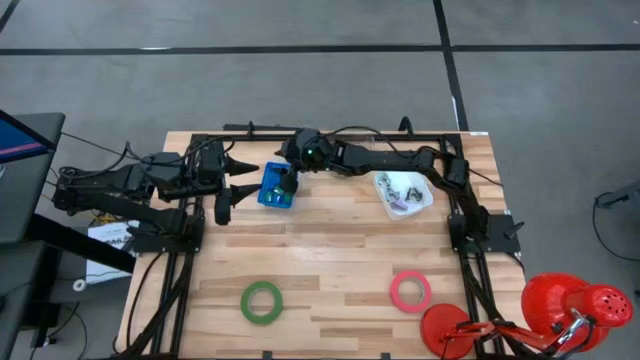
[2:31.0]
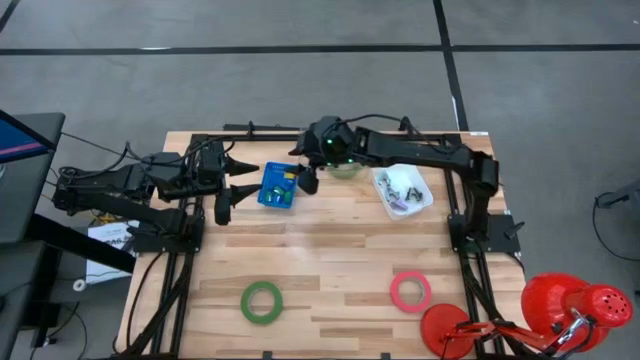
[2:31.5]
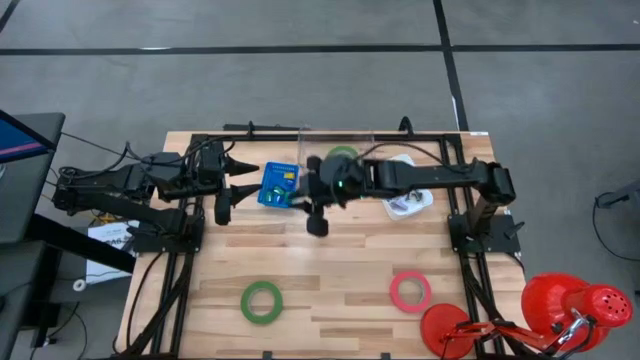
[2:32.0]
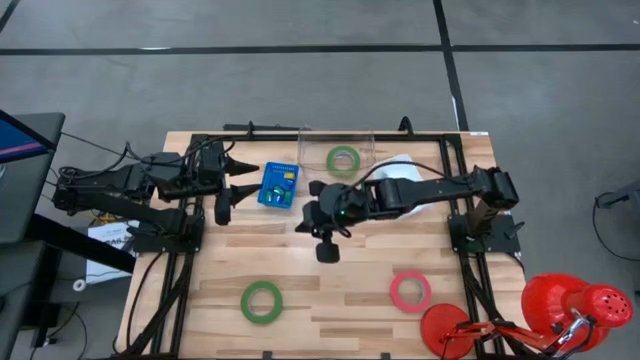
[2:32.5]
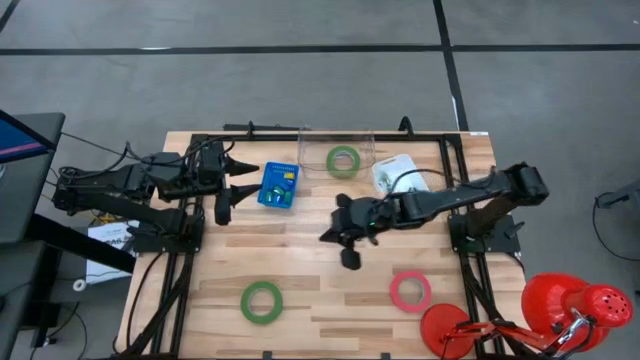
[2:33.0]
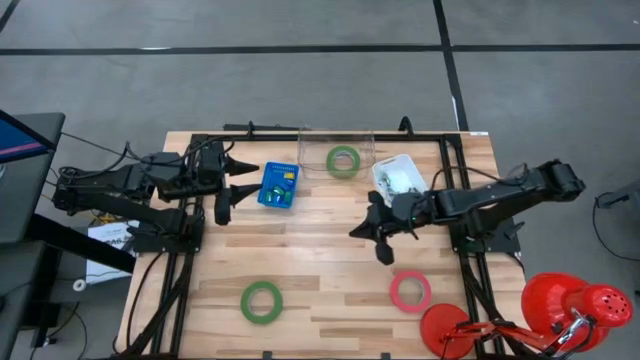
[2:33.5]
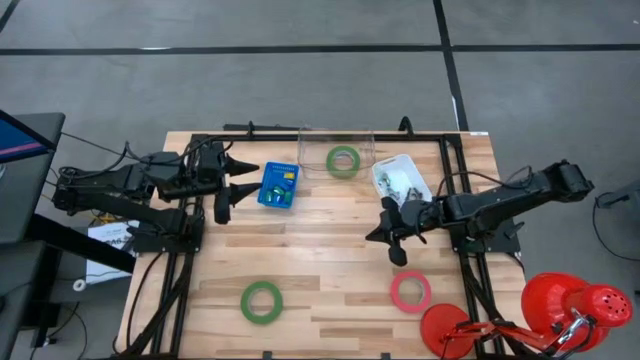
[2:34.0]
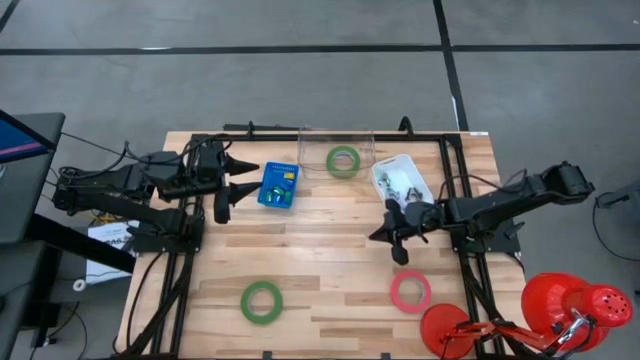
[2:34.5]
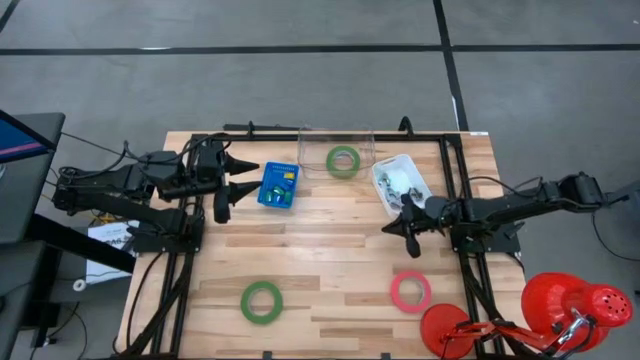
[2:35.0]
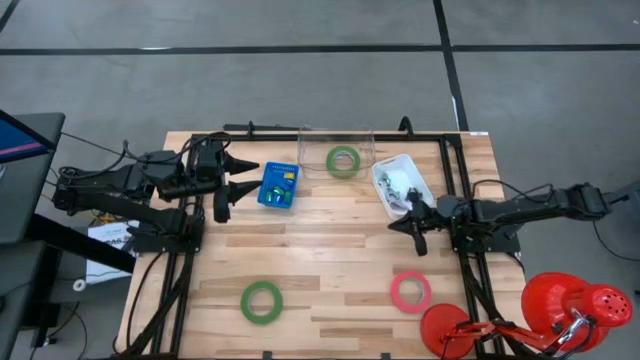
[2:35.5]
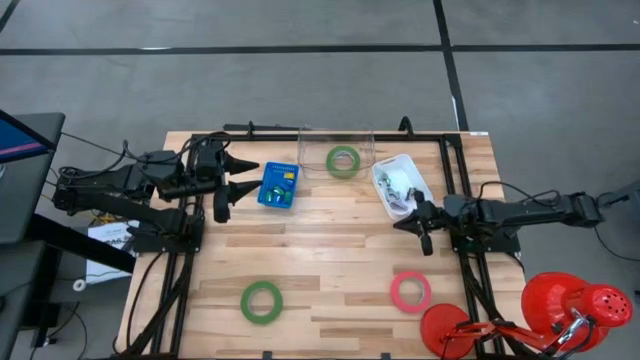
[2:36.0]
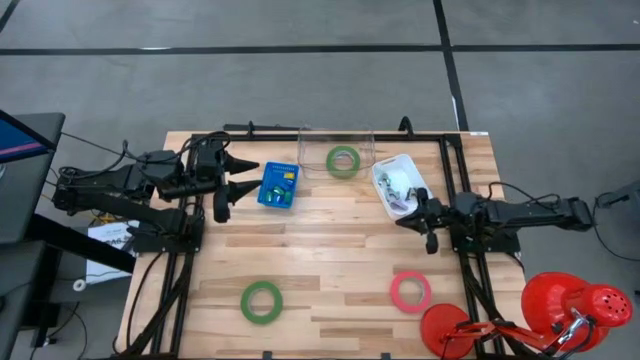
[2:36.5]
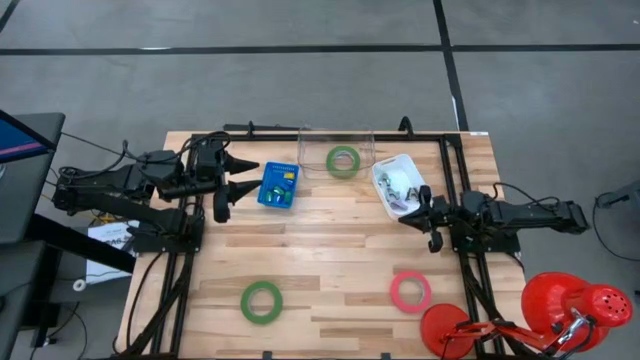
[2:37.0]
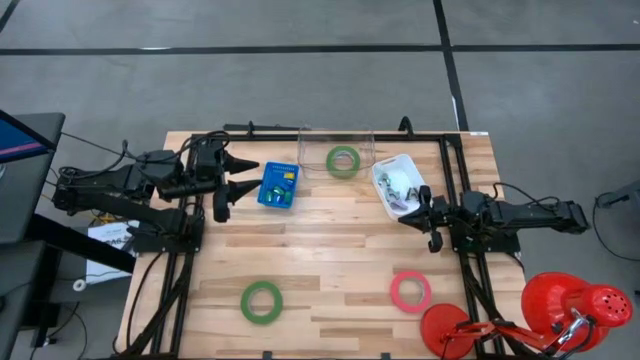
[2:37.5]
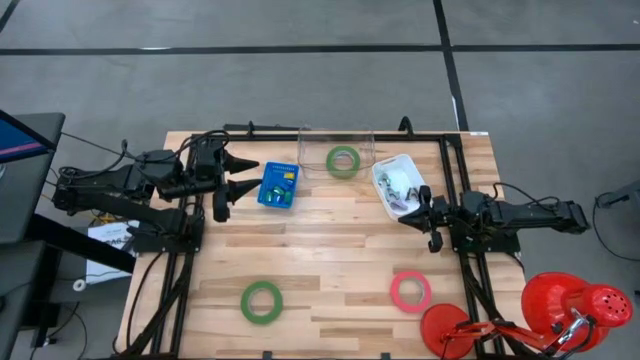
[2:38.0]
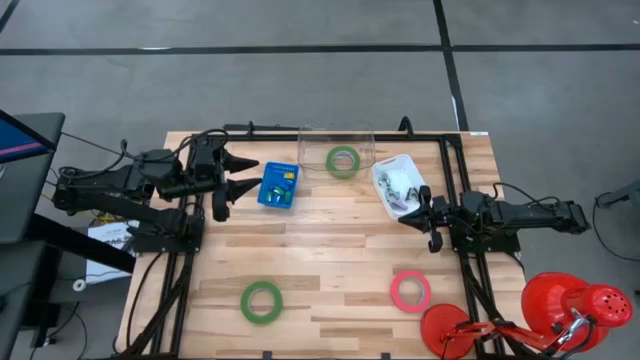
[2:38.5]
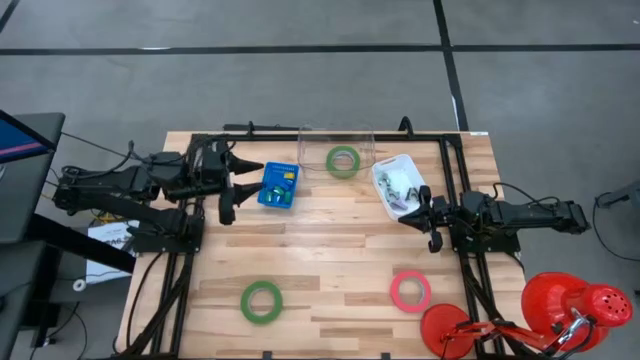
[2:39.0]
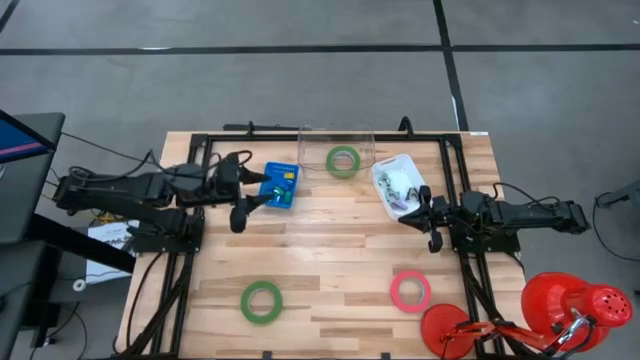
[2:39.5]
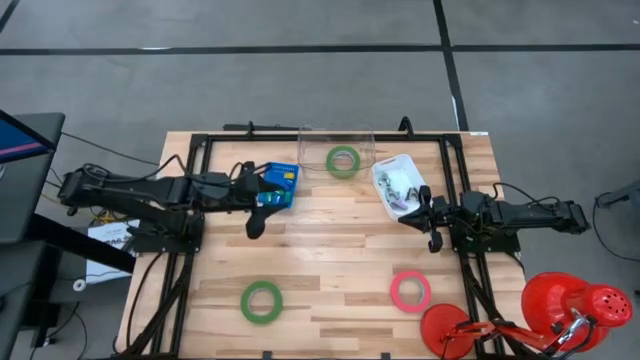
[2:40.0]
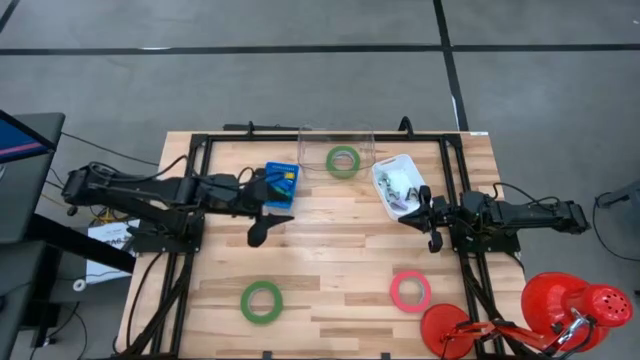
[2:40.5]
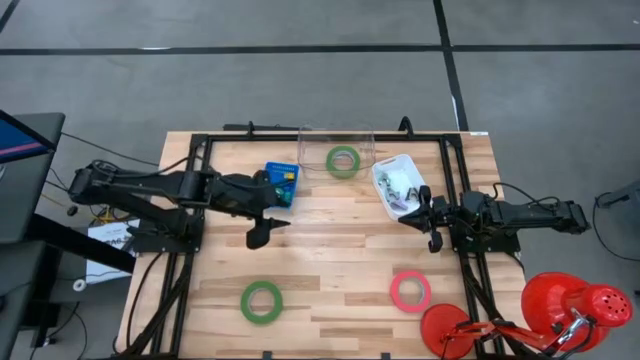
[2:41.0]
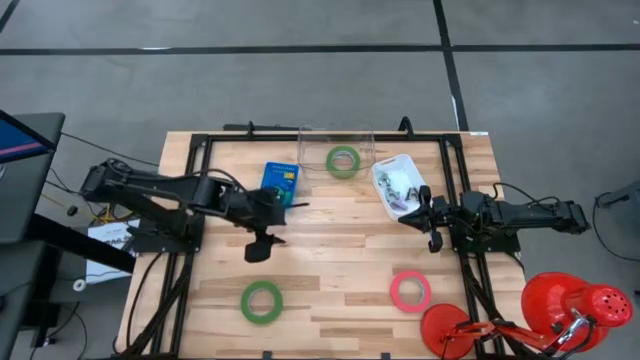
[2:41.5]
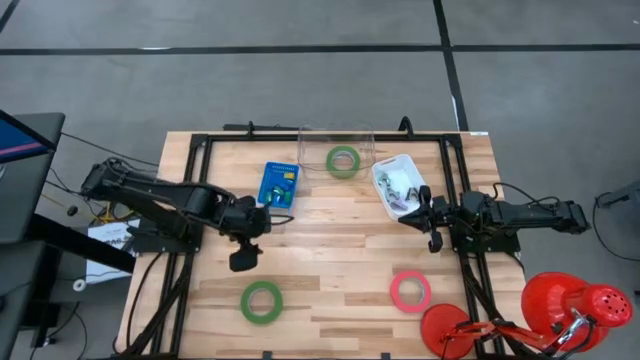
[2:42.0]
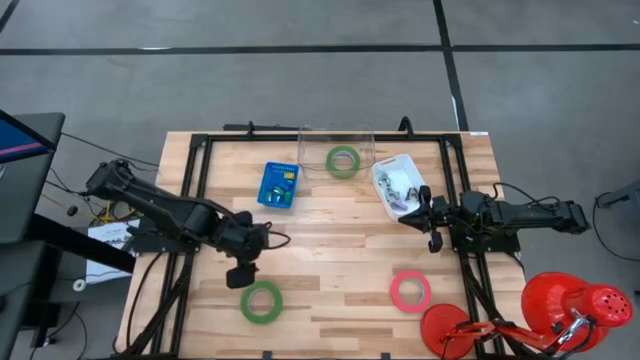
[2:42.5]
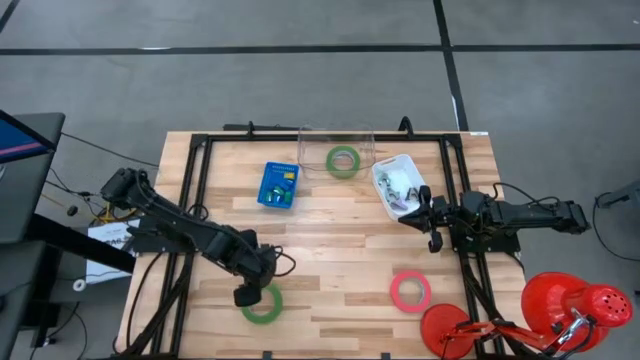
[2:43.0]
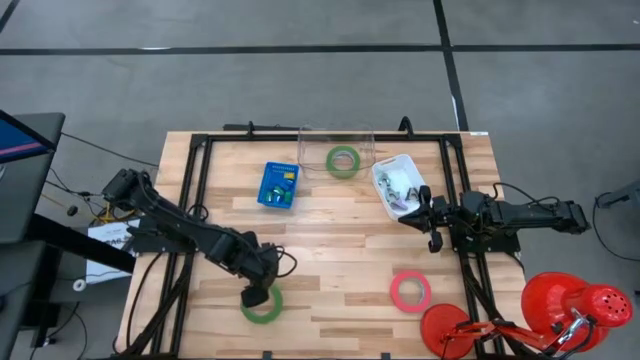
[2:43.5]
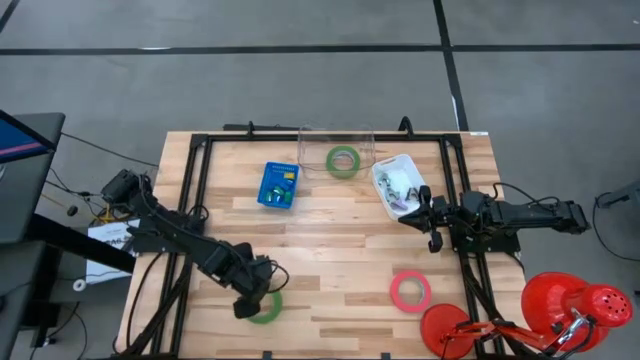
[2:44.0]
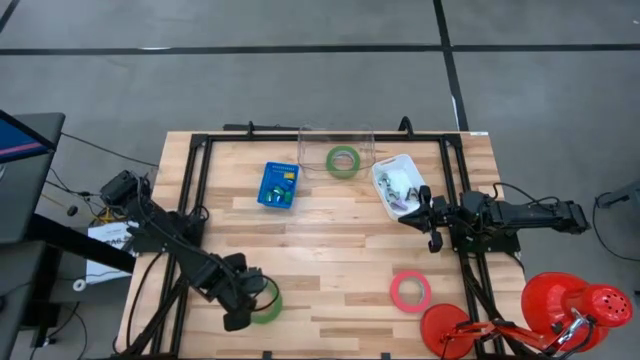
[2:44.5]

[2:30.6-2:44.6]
Task: Pick and place Stapler, Stapler remover, tape
Put the green tape into the transparent bin

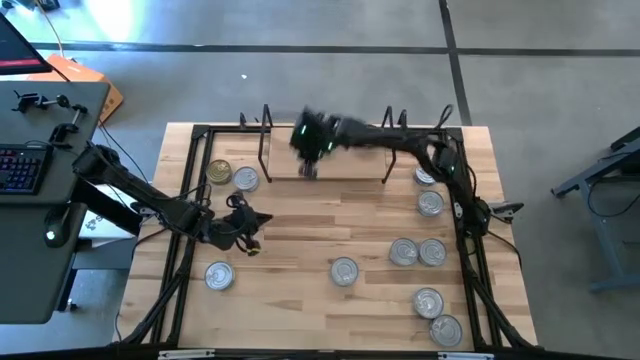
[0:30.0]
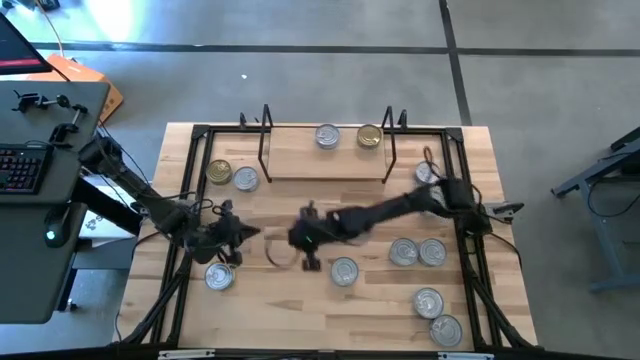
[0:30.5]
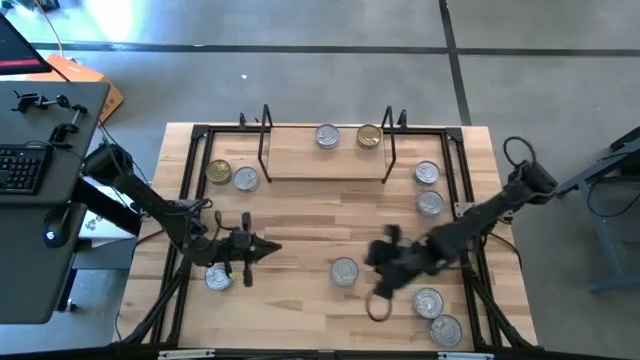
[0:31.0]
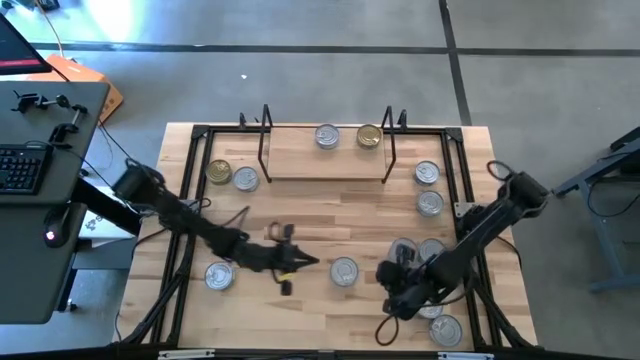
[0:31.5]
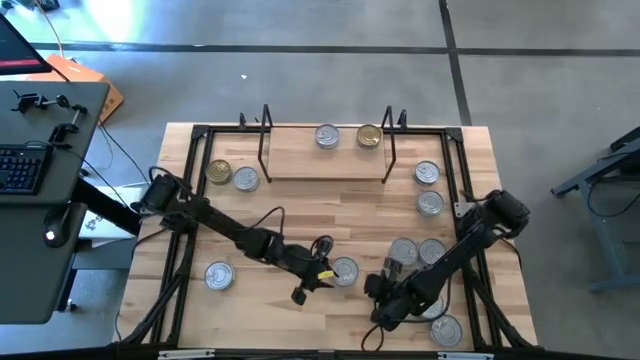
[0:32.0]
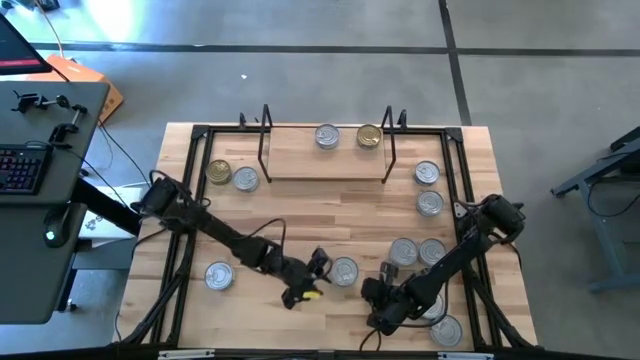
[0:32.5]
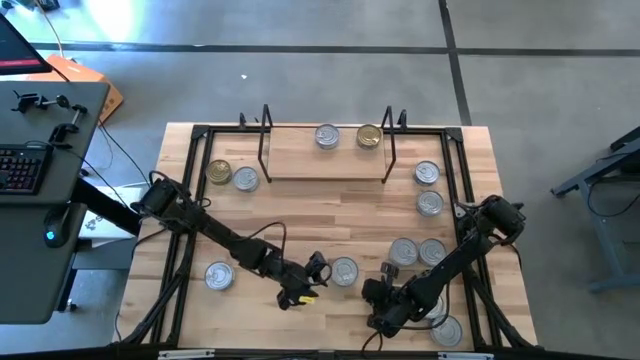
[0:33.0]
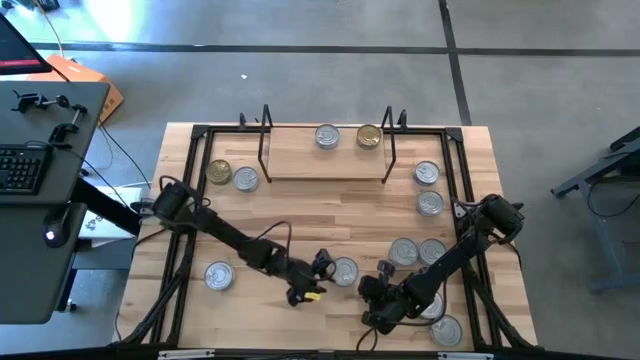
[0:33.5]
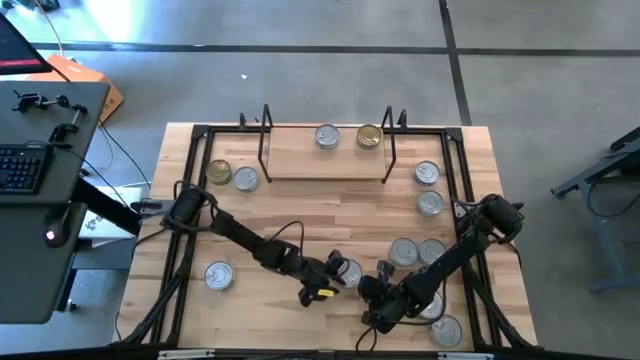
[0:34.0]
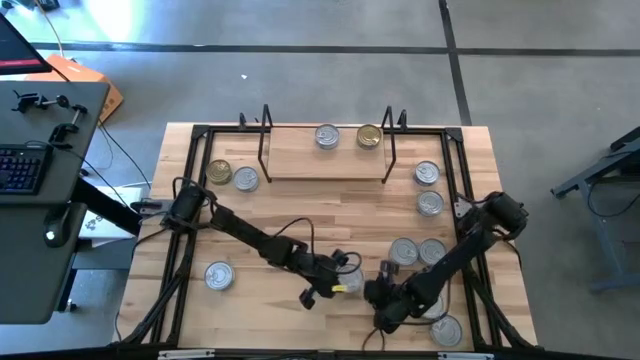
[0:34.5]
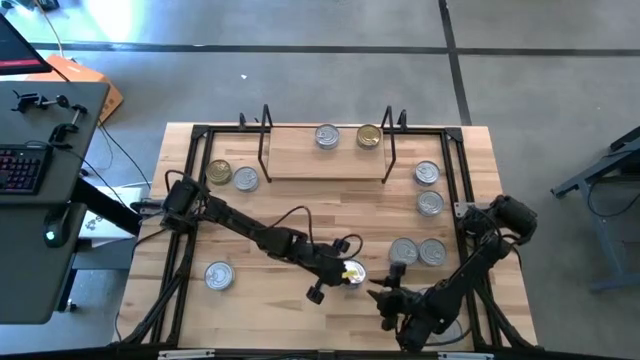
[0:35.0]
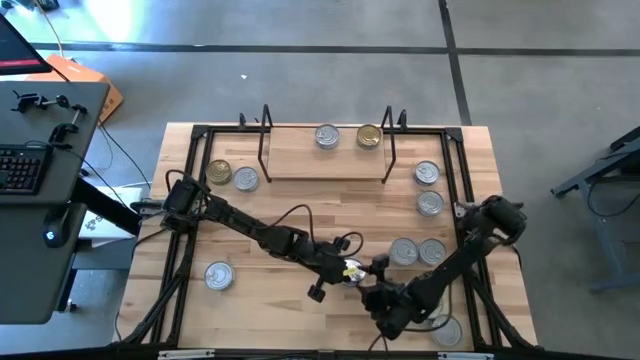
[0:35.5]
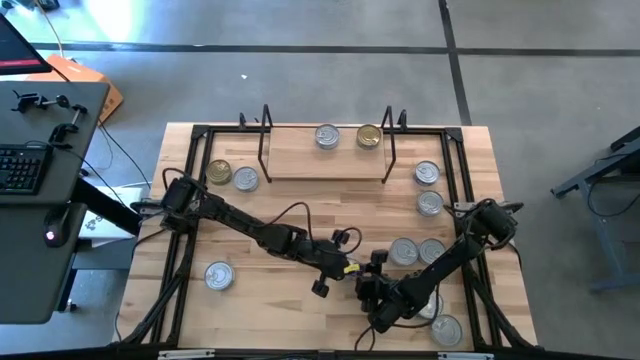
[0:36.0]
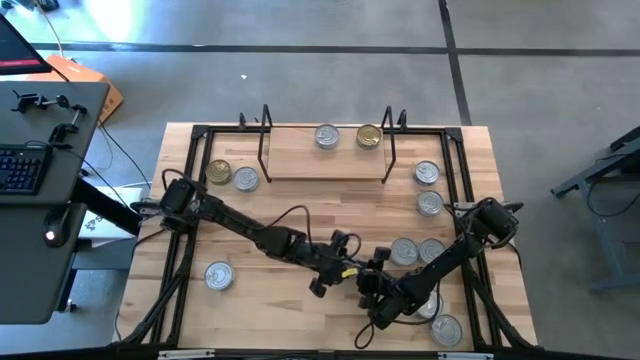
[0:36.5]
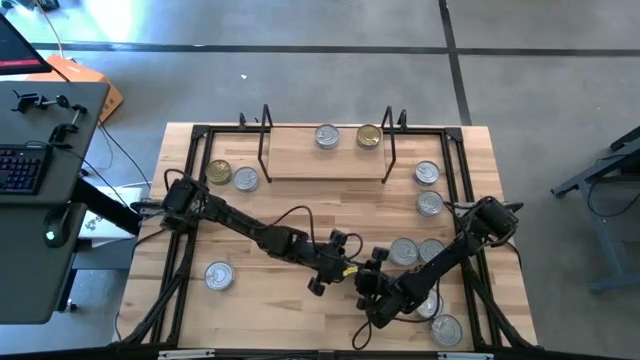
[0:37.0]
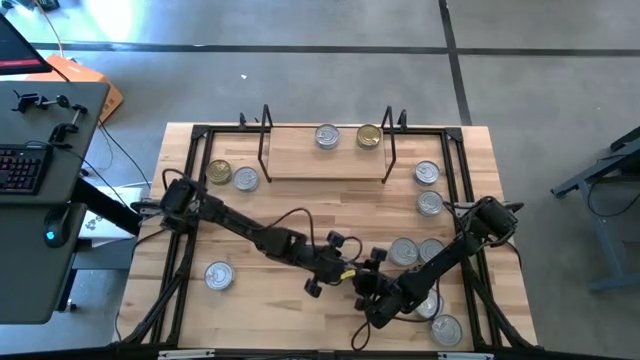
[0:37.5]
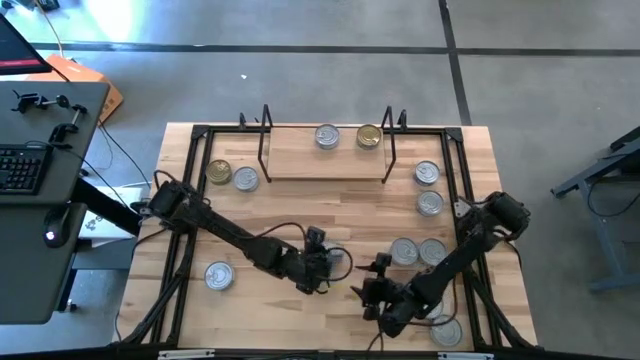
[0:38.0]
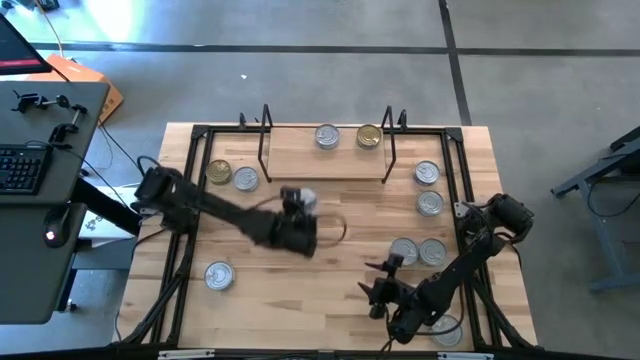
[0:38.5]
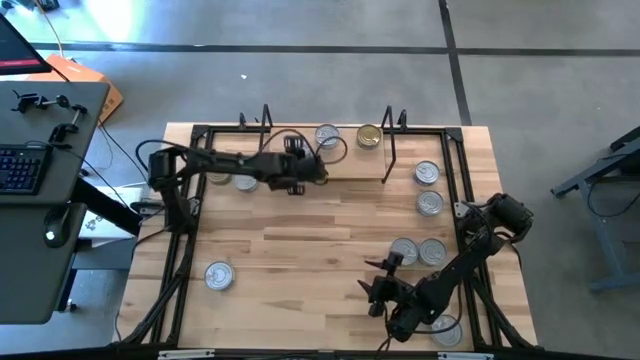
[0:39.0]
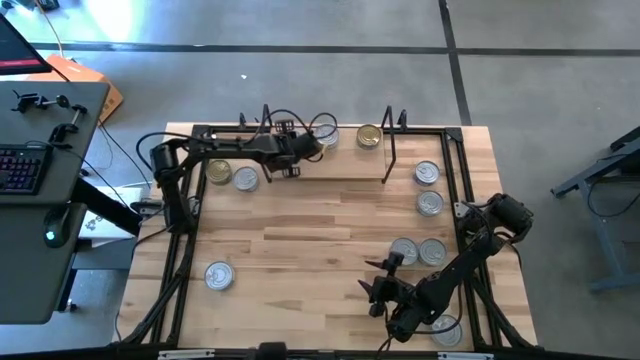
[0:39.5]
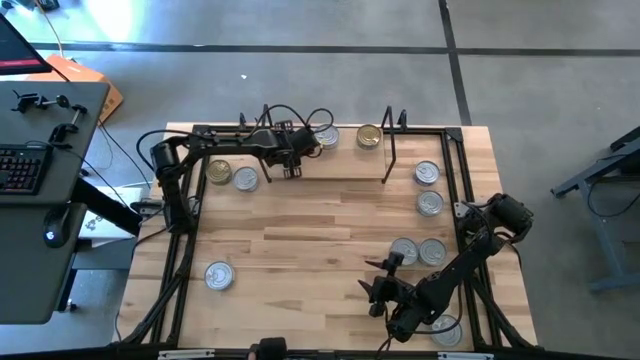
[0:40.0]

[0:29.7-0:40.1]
Task: Stack canned seafood by type on shelf
Put the blue tuna can on the shelf
